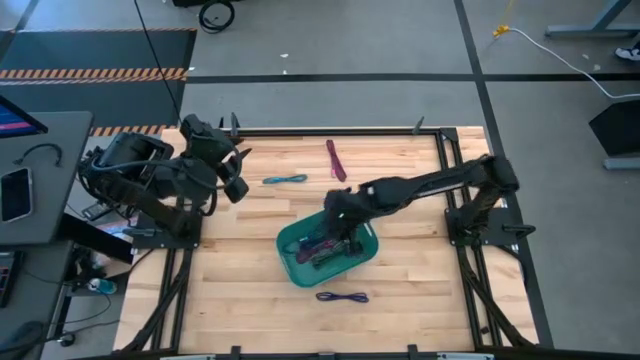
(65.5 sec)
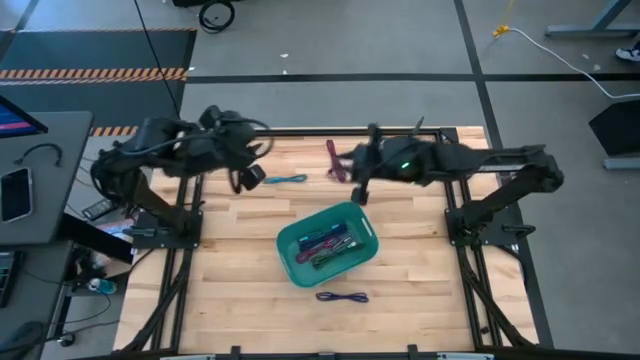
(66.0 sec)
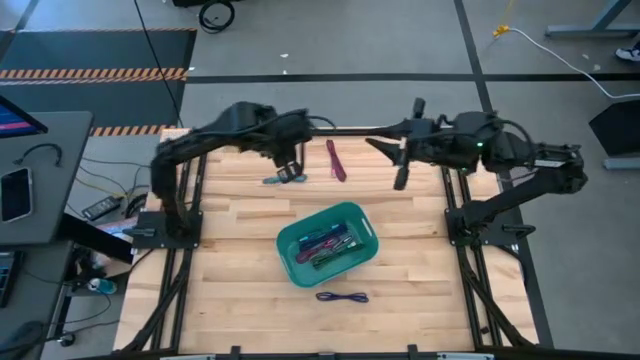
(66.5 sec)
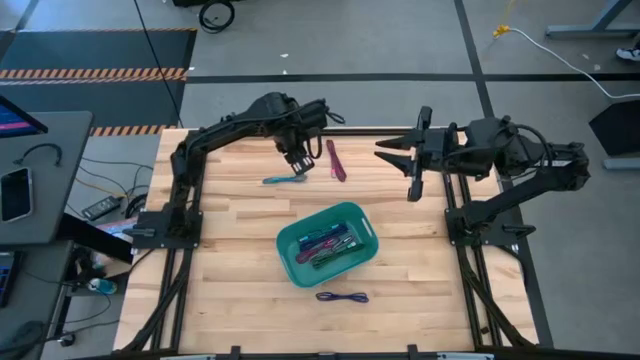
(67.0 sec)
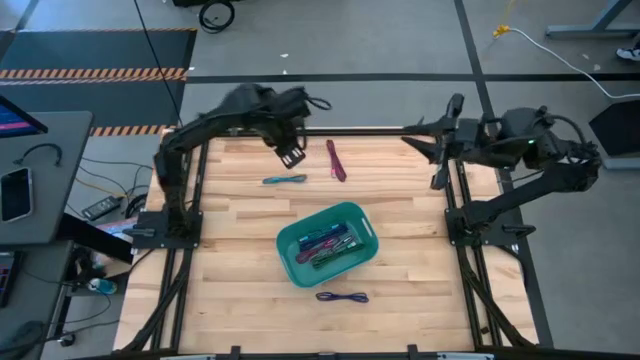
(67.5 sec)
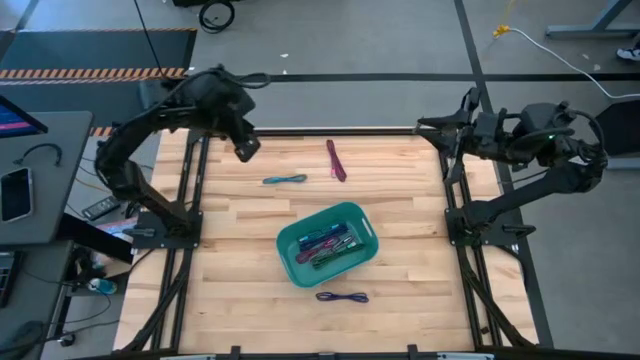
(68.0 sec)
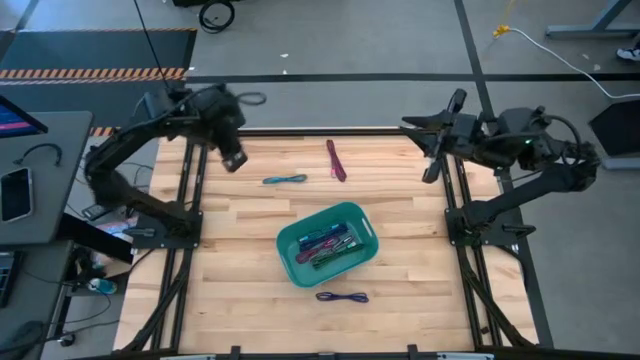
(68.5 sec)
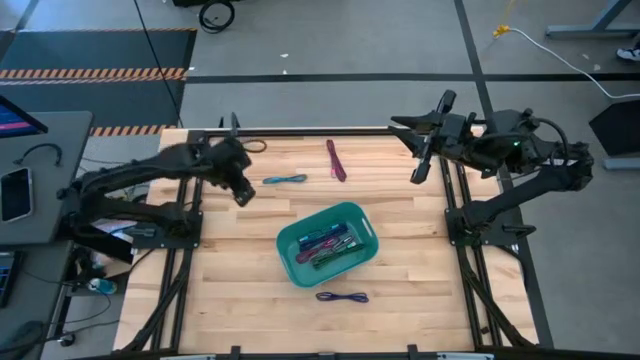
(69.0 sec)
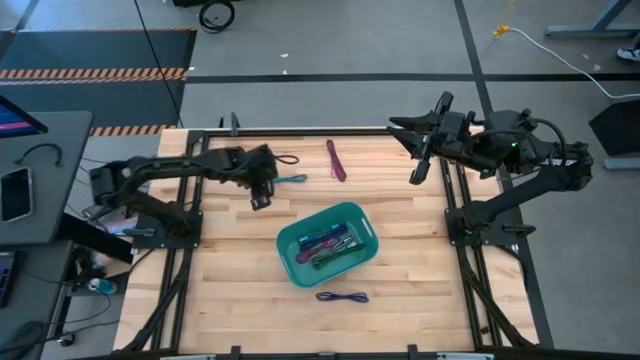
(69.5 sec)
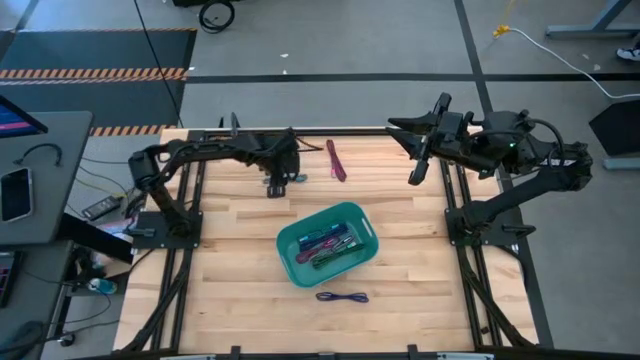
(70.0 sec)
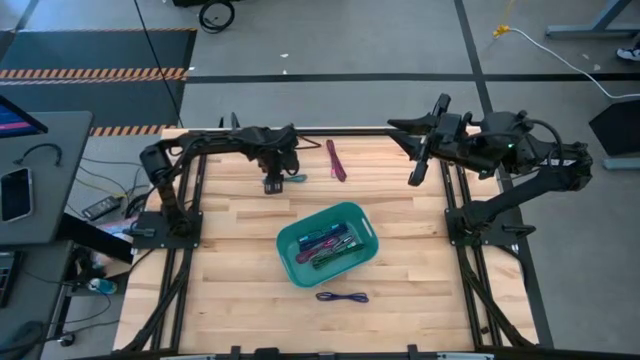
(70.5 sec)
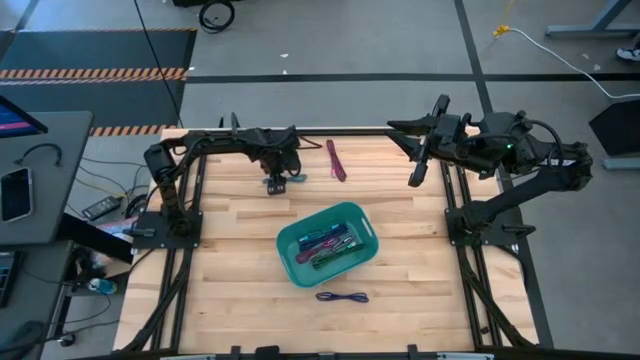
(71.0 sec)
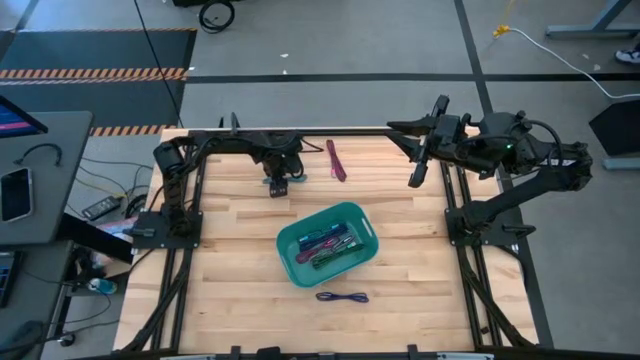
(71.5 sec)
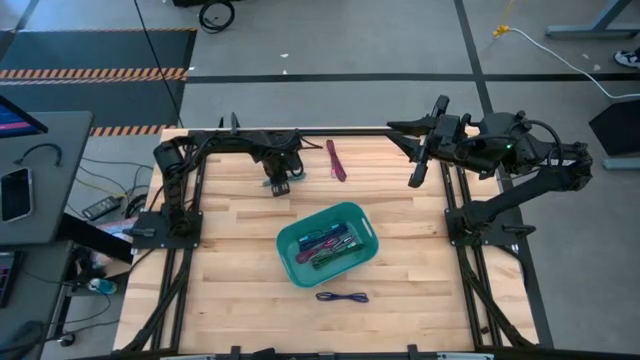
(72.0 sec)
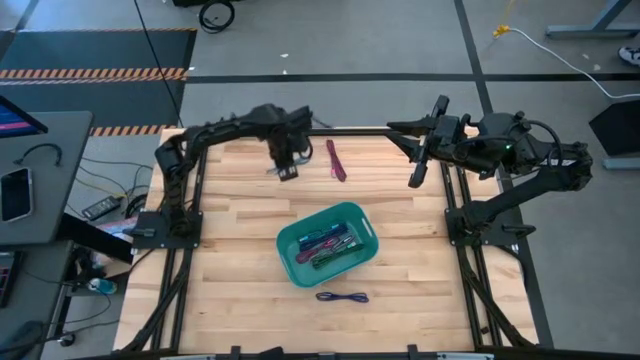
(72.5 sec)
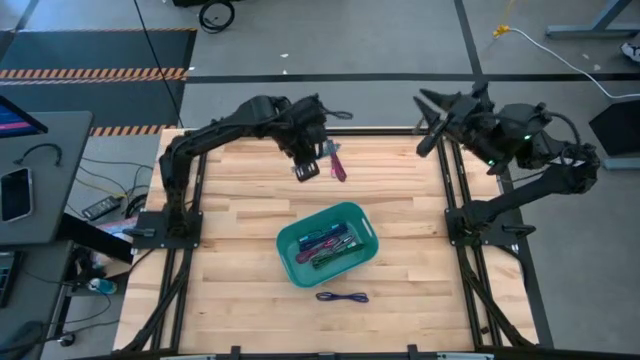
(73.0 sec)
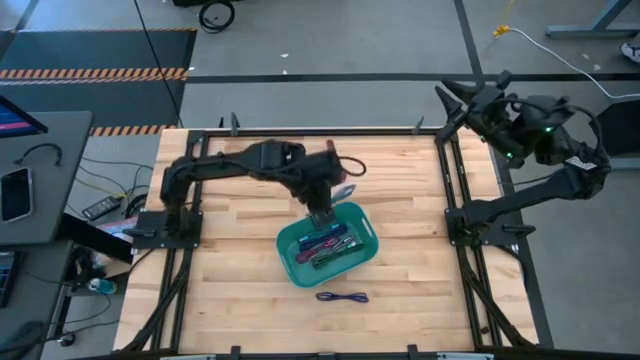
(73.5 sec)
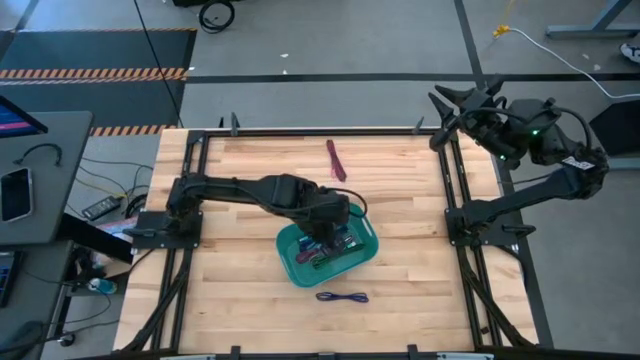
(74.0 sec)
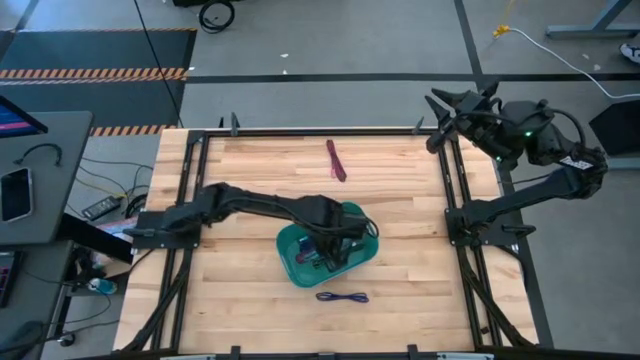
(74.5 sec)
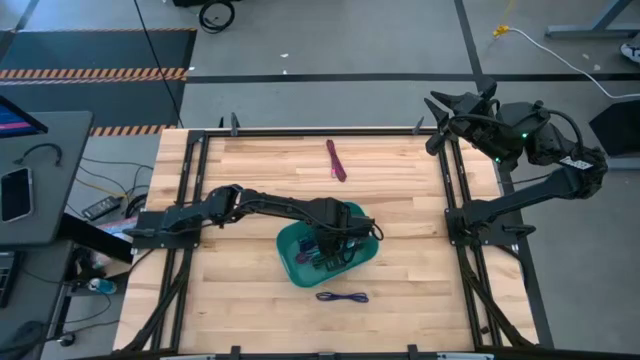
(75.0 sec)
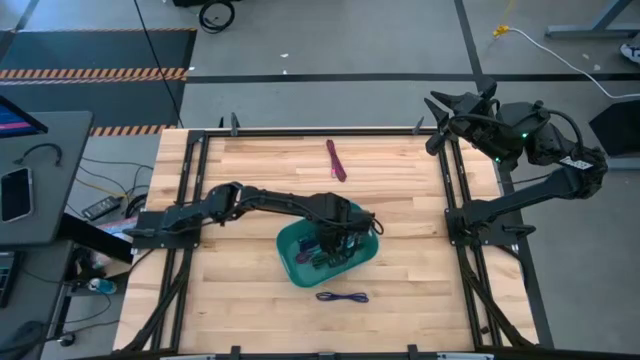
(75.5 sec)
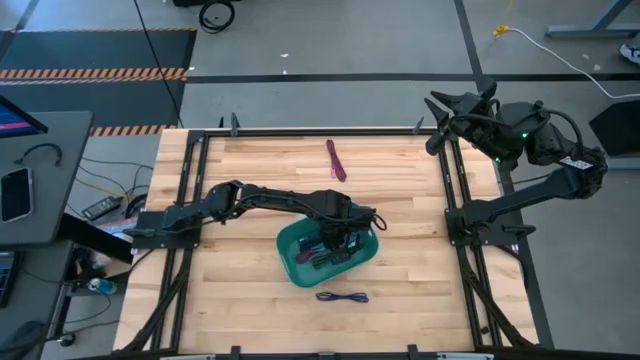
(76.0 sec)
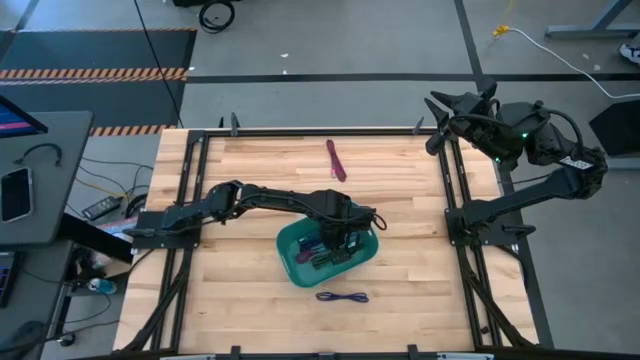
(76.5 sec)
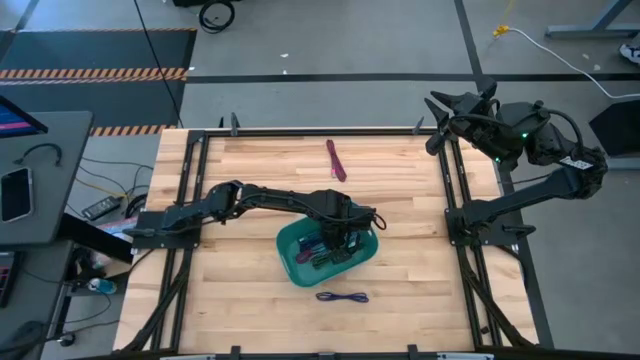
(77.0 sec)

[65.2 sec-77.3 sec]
Task: Pick and place USB-C Cables
Put the blue charger cable into the blue bin

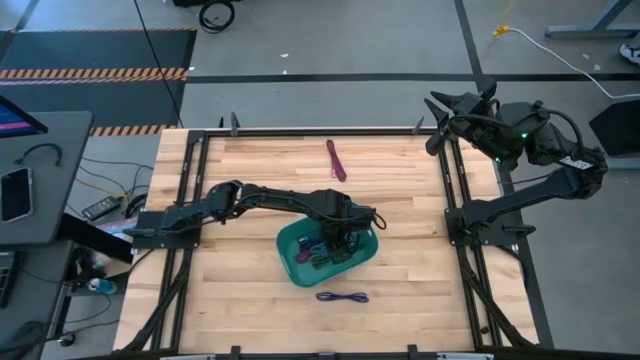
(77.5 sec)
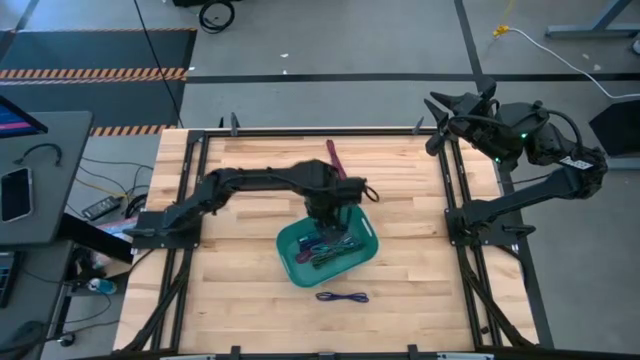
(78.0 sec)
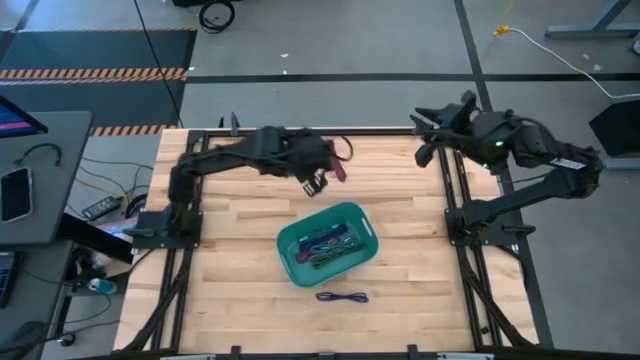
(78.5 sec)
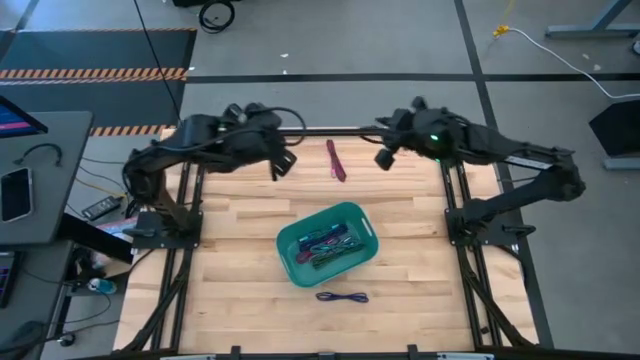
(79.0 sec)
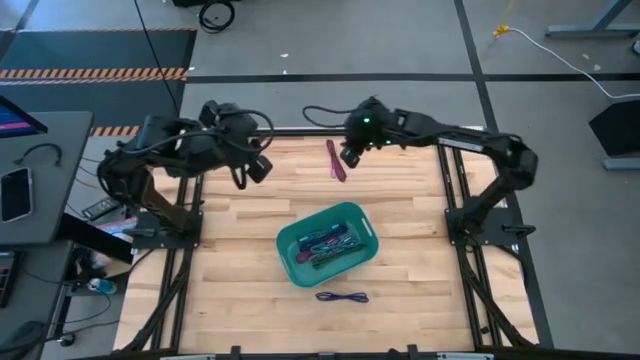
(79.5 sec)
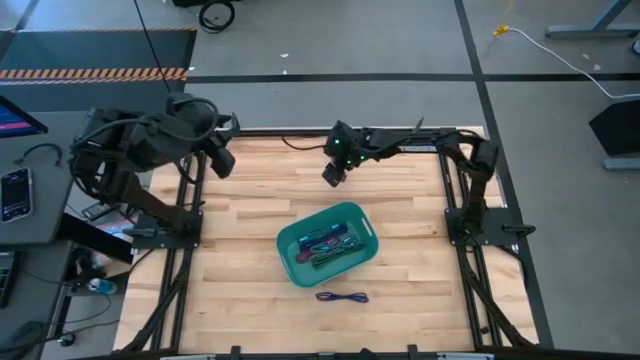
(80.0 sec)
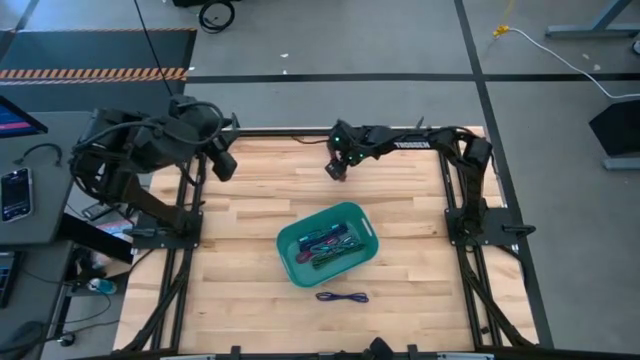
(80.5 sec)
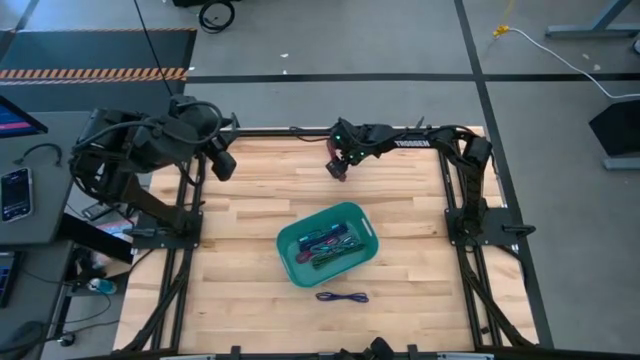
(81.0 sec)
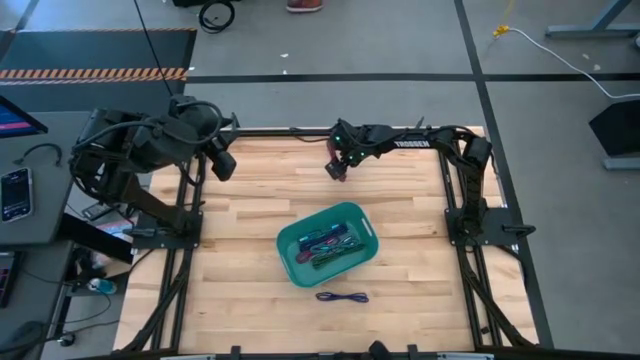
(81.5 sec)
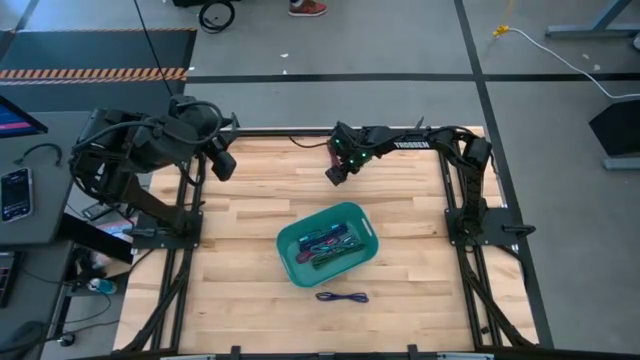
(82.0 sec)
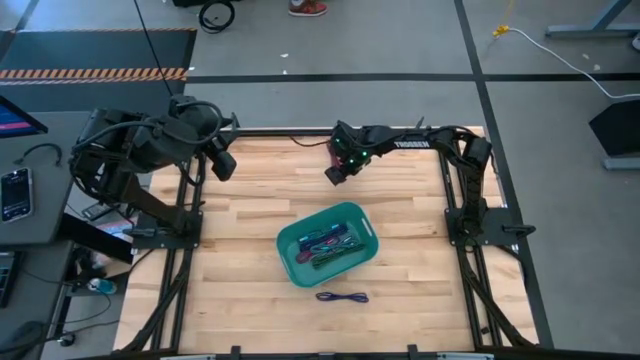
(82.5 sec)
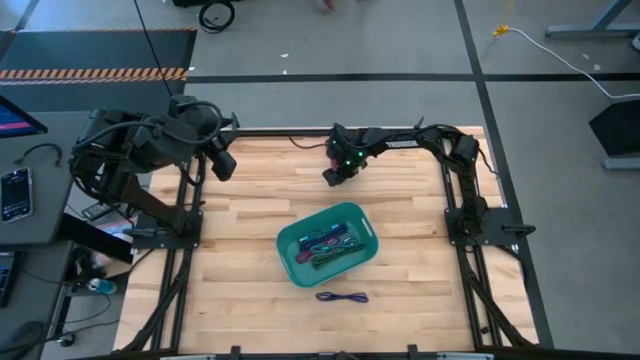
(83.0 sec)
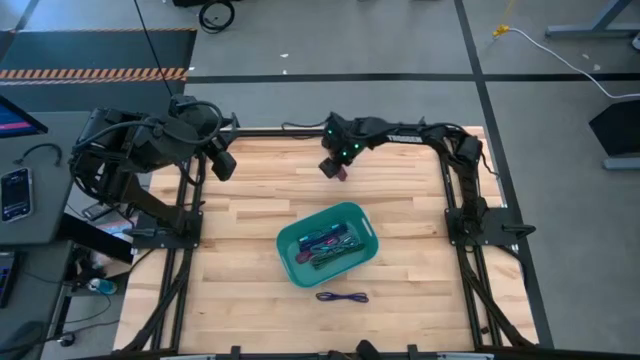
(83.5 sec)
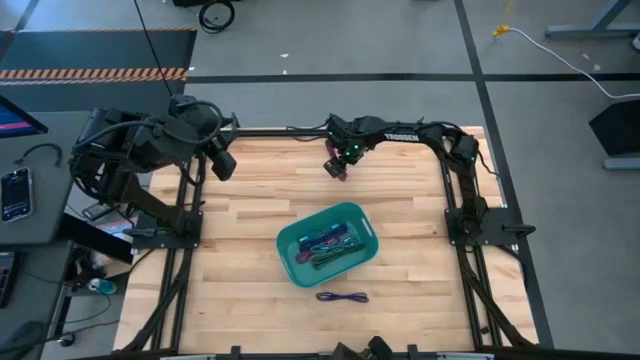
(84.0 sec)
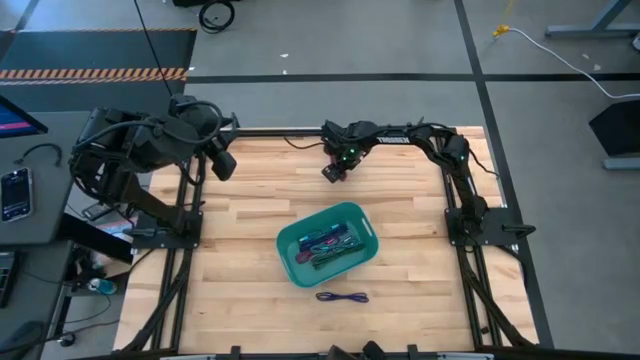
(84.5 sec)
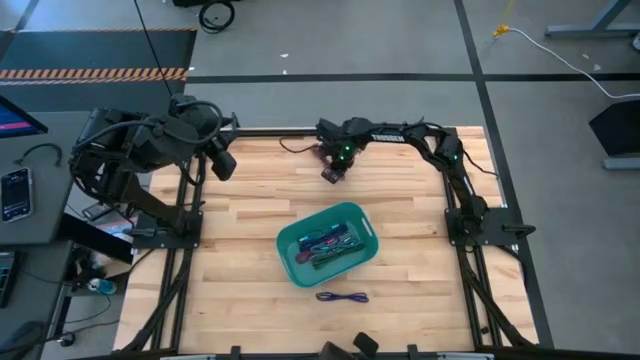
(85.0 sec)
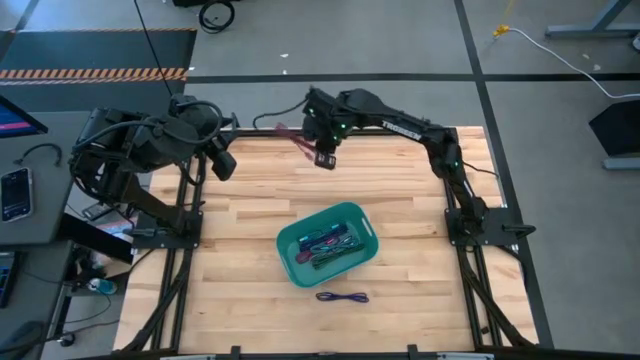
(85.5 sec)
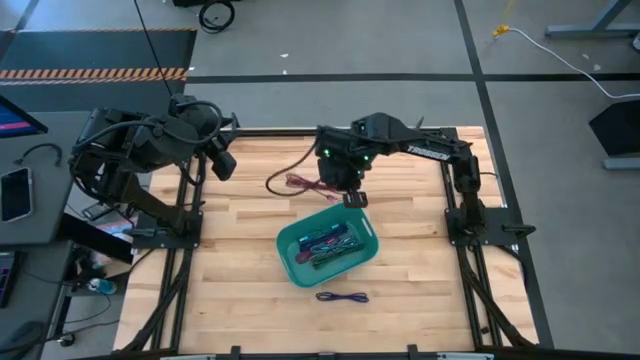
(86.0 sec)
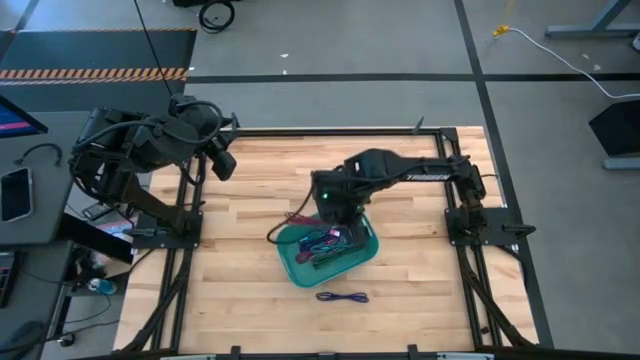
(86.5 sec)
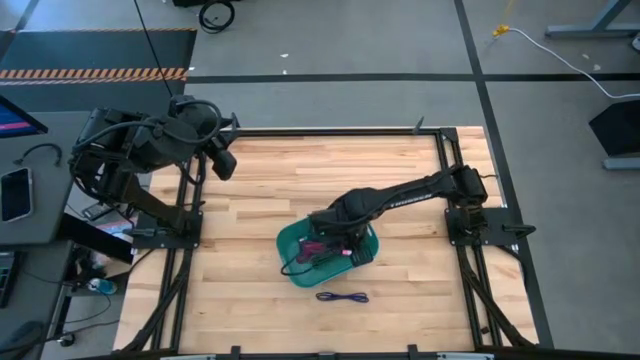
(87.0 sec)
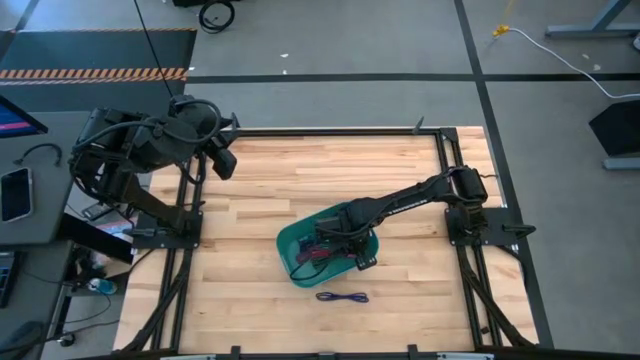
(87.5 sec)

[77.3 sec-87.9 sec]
Put the pink charger cable into the blue bin
